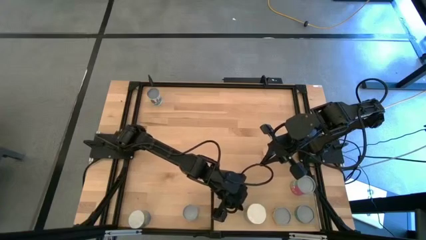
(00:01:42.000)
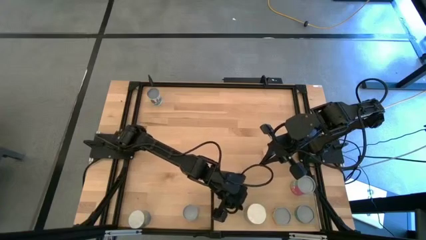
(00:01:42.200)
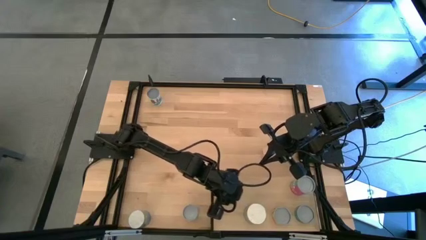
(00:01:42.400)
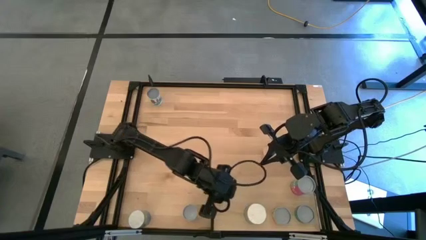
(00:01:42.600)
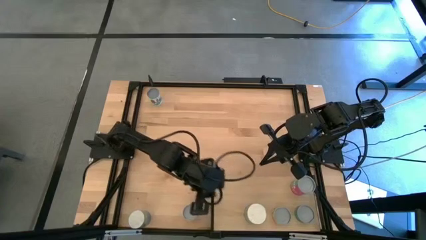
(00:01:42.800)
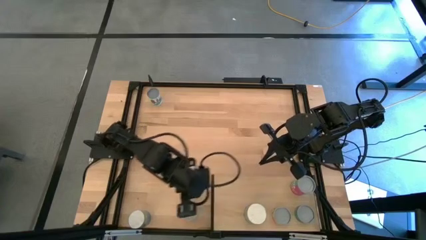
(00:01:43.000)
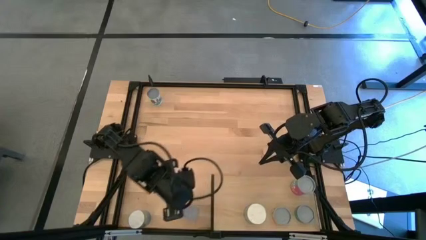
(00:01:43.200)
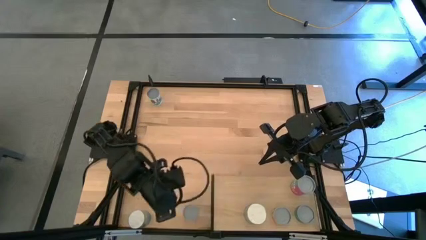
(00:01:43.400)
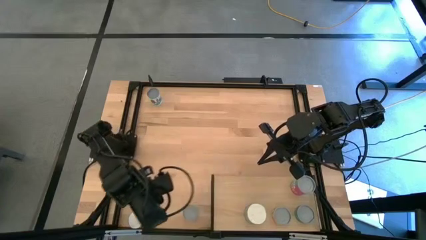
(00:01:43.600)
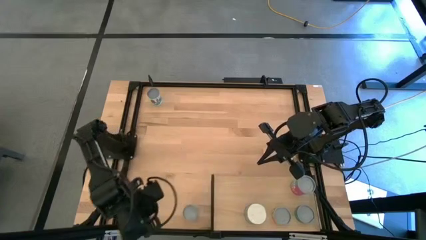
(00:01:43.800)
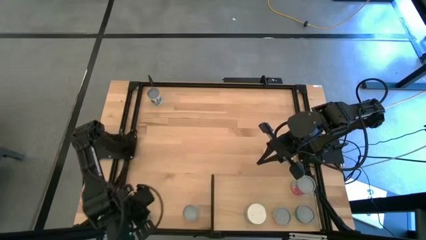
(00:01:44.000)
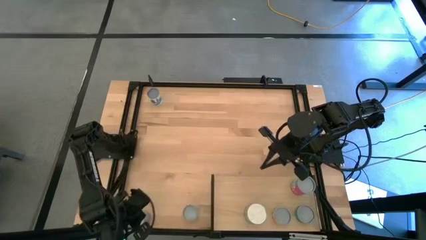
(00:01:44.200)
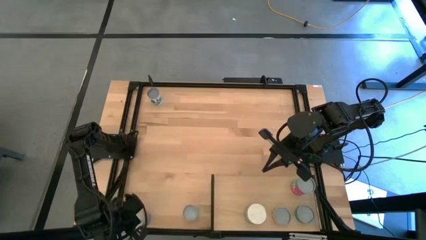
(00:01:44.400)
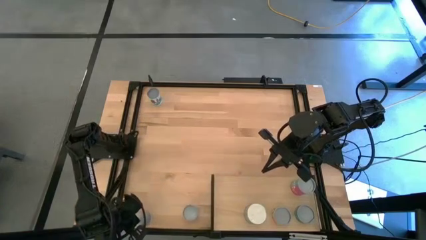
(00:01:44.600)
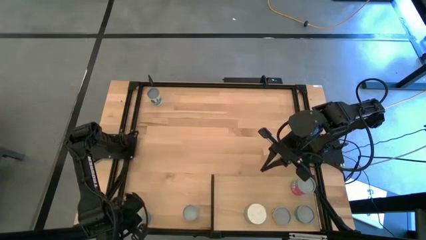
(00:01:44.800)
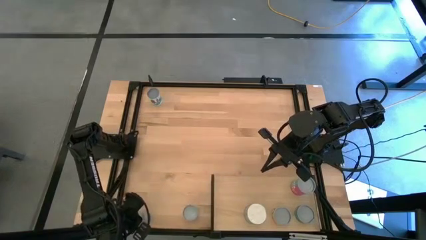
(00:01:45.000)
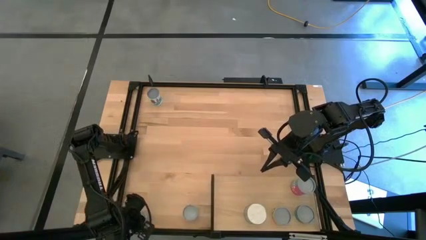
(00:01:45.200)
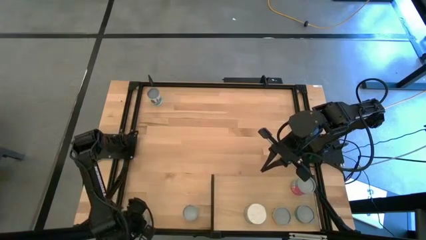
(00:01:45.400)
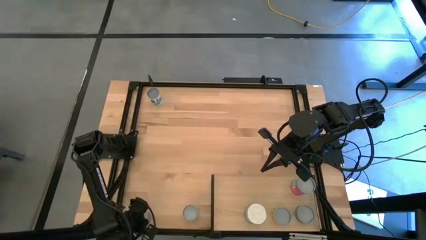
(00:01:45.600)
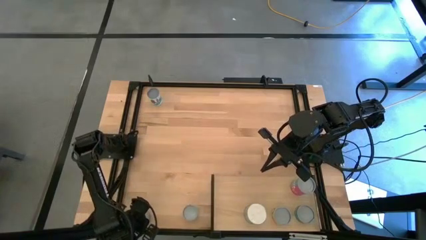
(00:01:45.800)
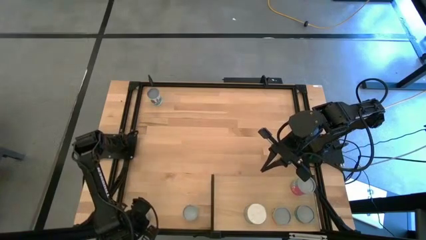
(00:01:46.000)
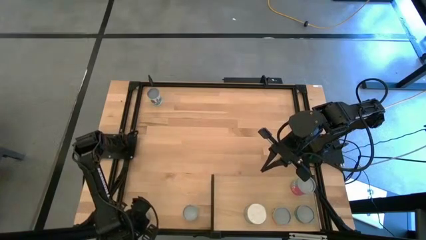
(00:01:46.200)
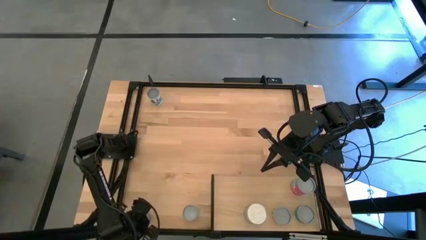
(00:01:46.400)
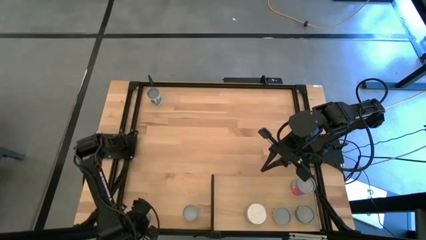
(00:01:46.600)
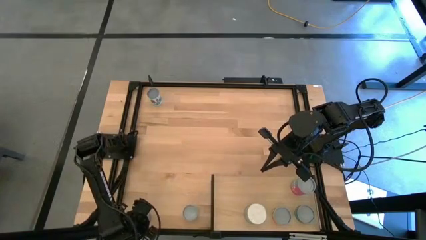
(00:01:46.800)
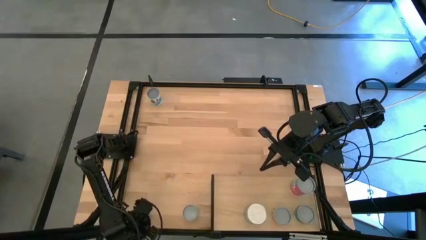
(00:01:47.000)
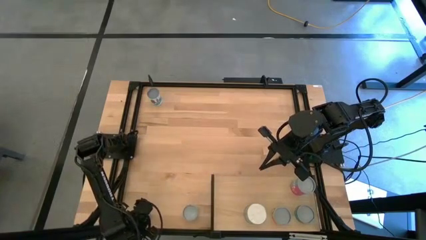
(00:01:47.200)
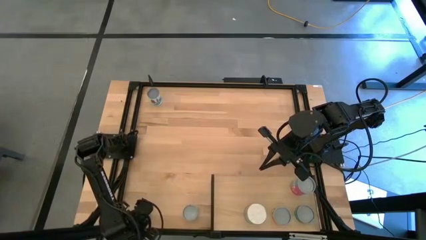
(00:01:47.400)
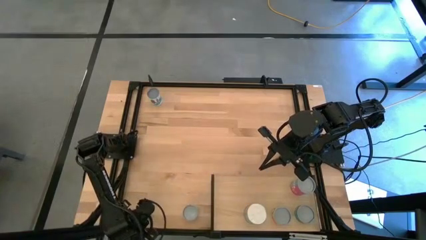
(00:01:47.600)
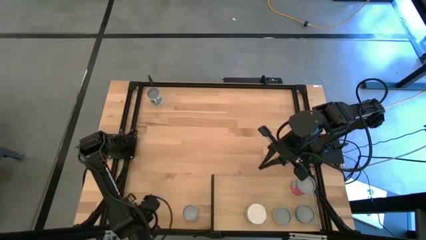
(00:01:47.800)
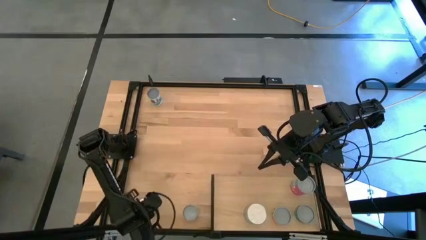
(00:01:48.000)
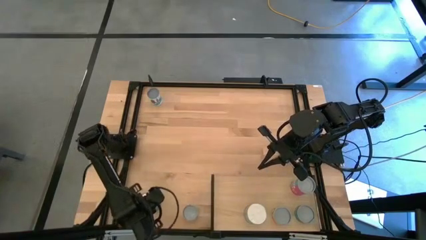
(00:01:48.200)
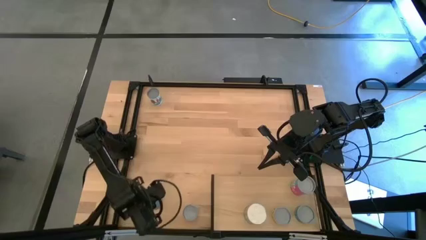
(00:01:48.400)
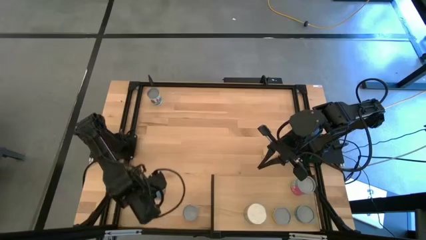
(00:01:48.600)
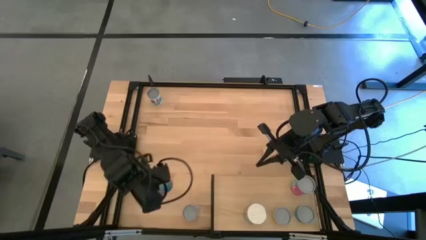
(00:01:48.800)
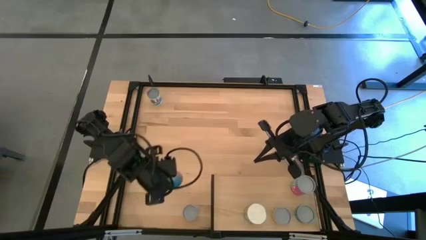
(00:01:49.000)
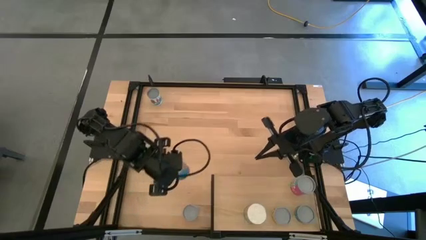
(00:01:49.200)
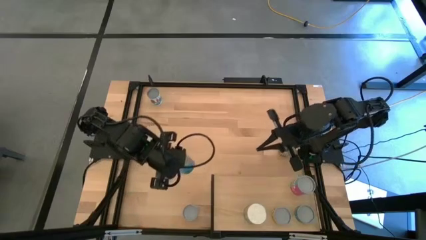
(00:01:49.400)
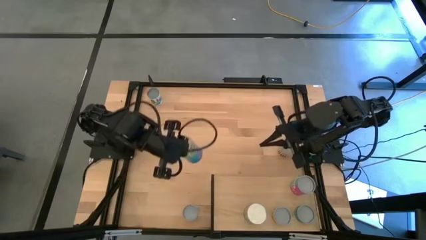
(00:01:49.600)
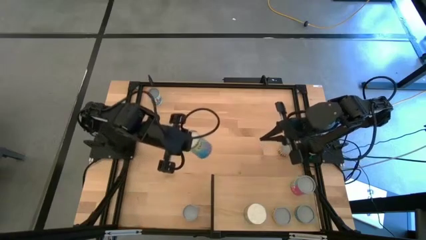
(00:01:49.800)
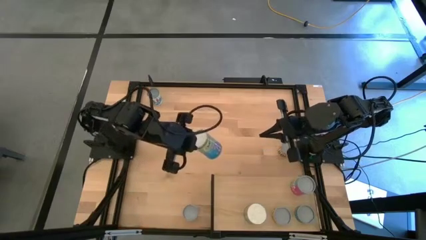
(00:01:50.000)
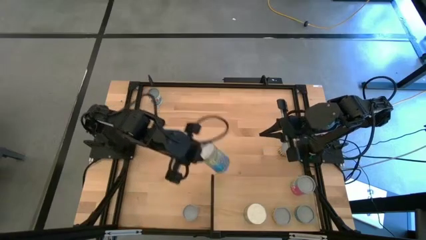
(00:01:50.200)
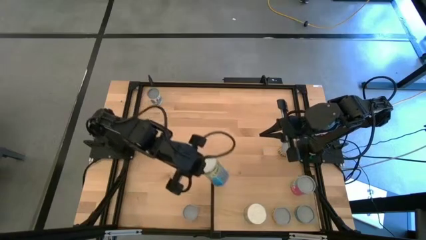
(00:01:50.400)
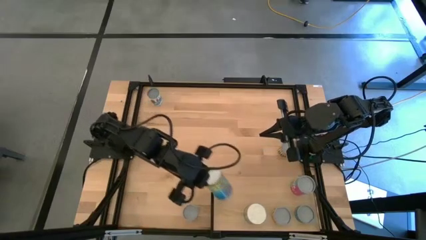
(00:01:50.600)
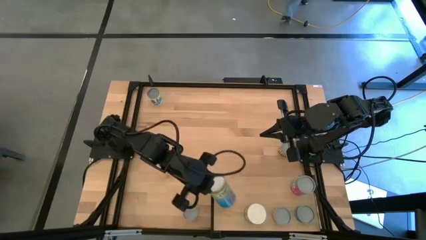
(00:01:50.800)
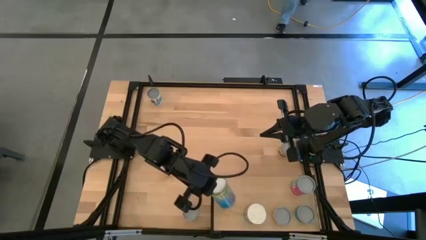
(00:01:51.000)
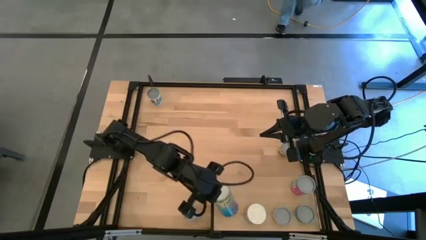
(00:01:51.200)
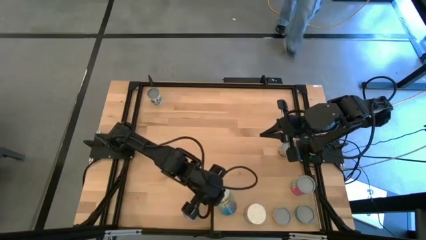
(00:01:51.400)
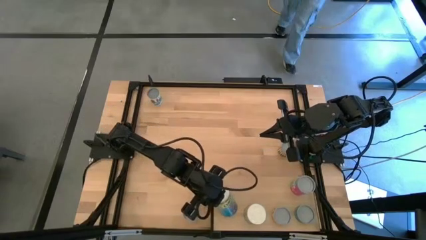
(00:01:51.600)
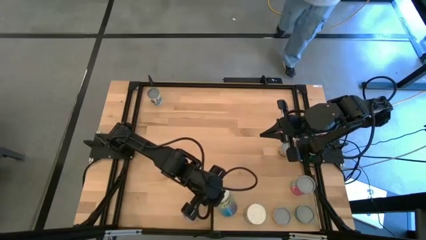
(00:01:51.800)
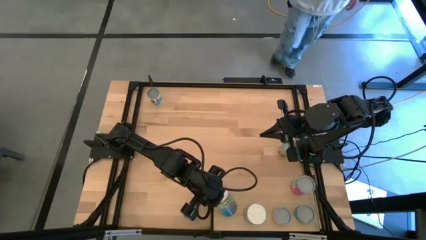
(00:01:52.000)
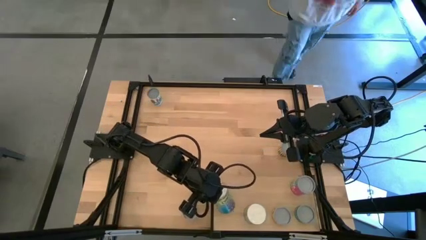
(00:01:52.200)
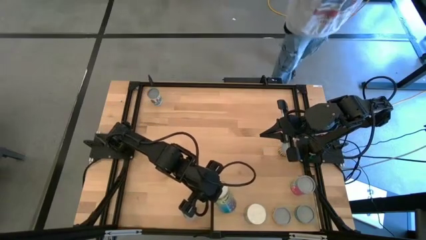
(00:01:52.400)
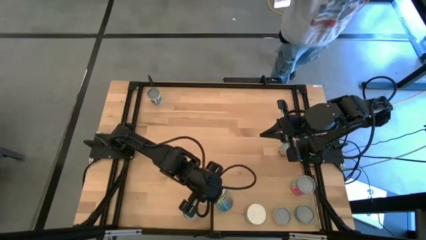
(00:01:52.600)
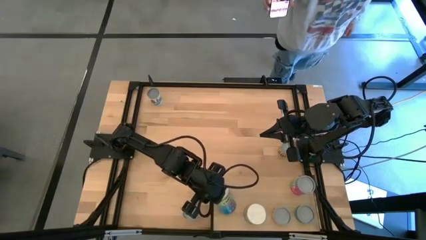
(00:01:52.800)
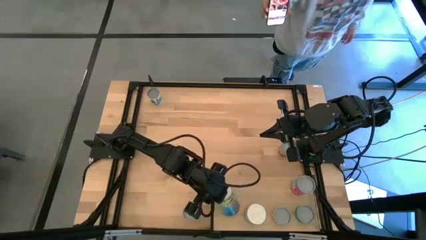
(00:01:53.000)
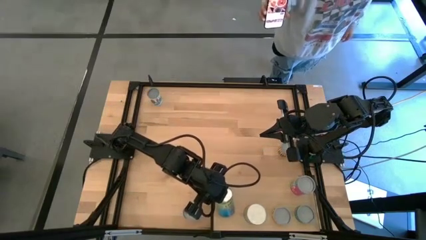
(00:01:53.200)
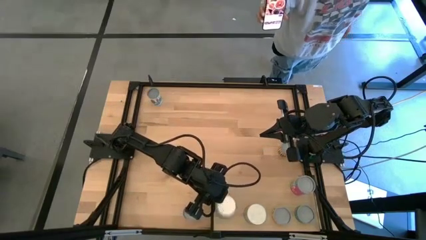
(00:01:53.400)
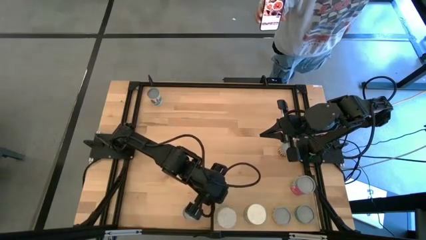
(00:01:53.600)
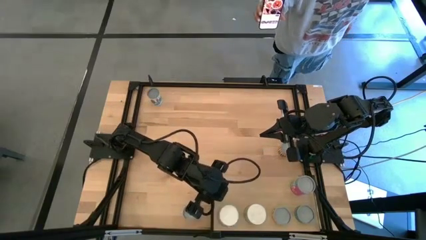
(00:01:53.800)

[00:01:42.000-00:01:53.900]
Task: Pick and place cans onto a shelf
Put the canned cherries on the shelf
